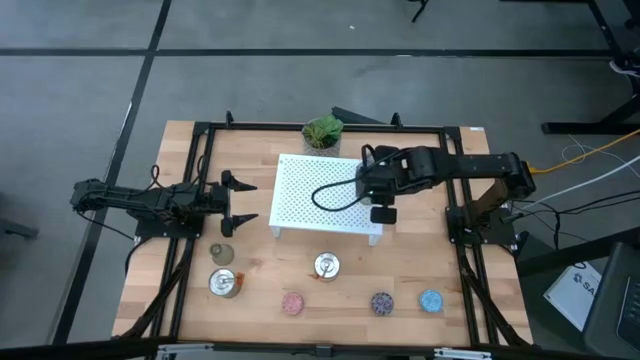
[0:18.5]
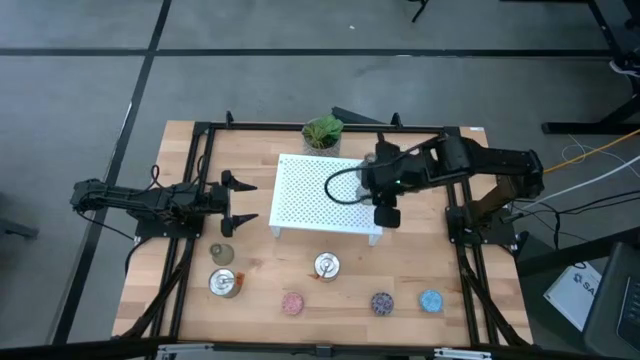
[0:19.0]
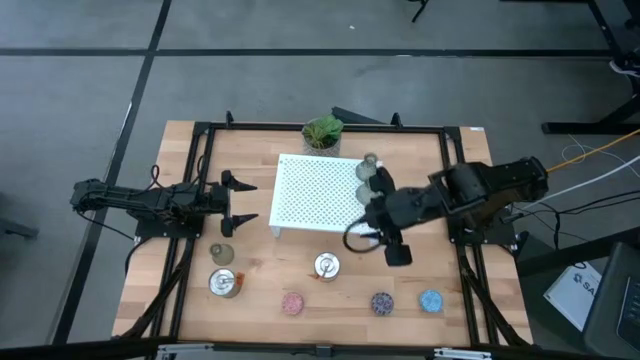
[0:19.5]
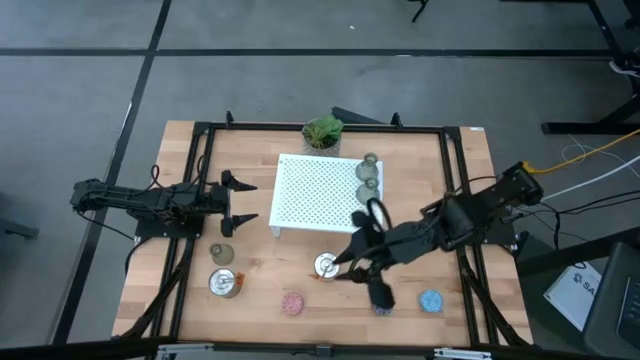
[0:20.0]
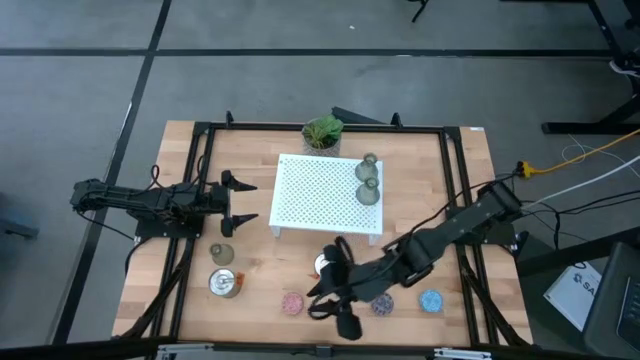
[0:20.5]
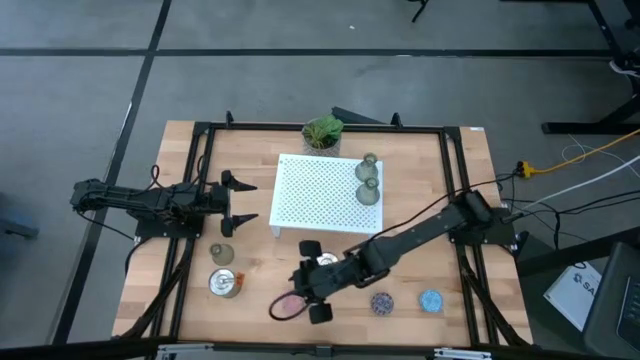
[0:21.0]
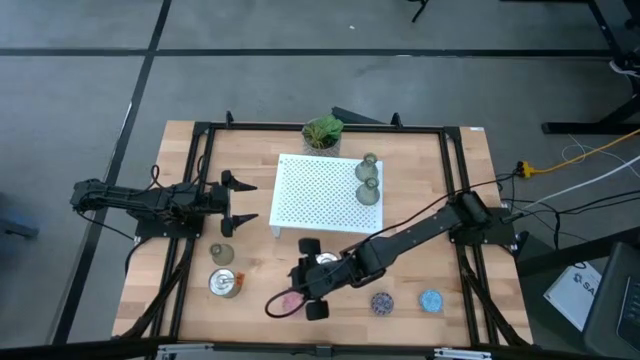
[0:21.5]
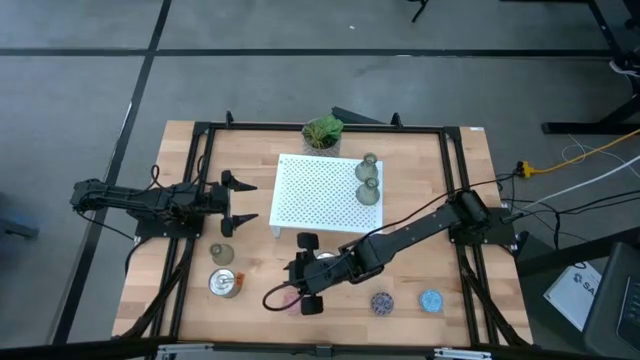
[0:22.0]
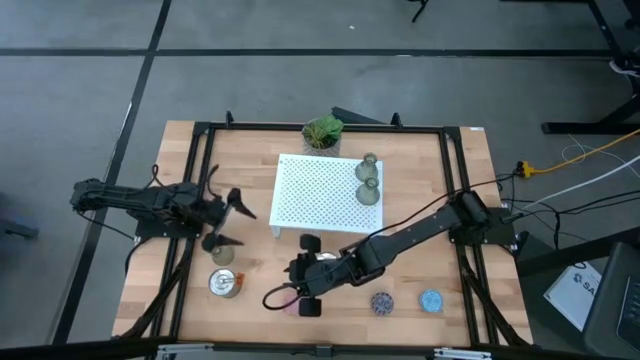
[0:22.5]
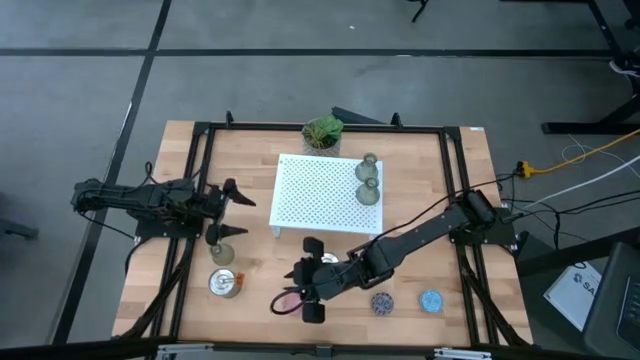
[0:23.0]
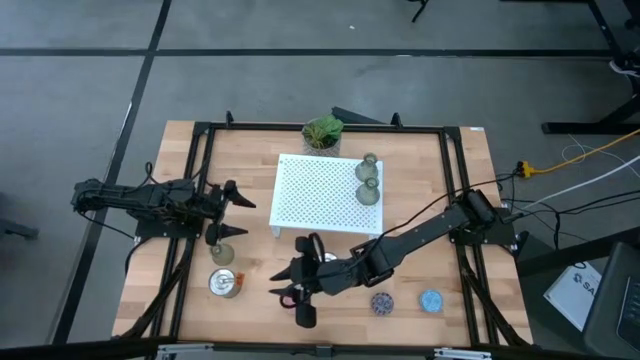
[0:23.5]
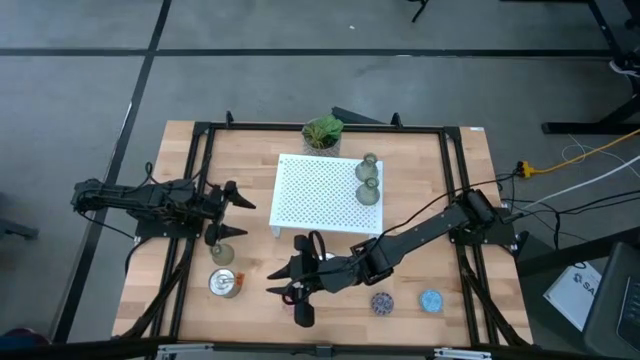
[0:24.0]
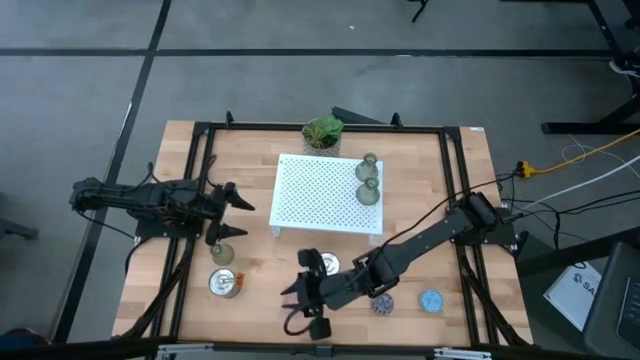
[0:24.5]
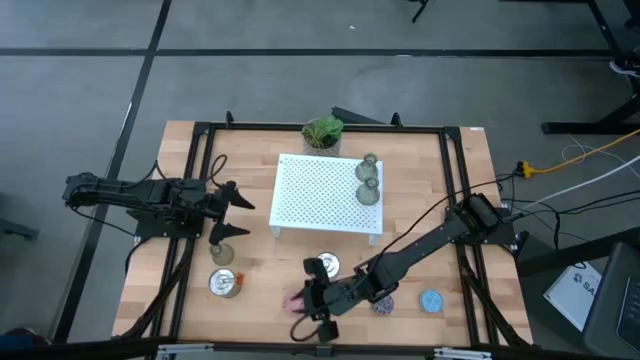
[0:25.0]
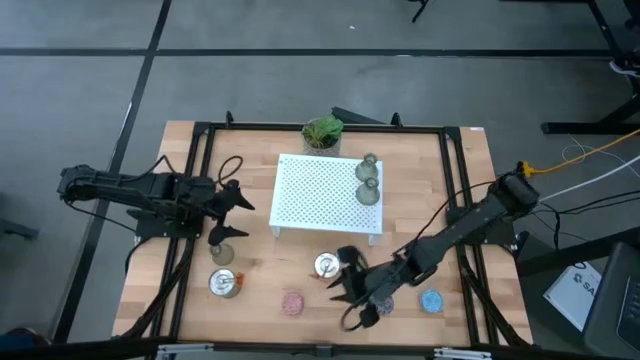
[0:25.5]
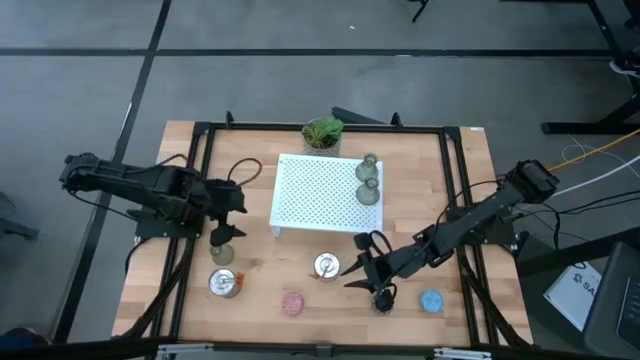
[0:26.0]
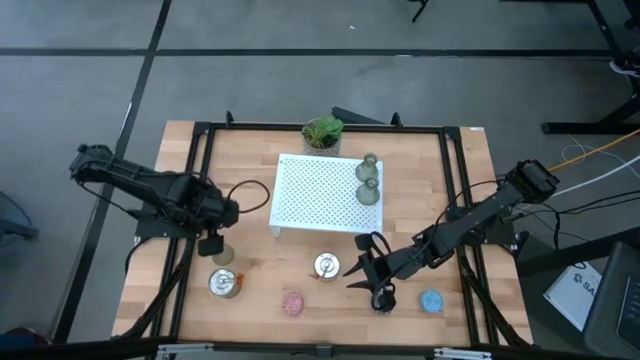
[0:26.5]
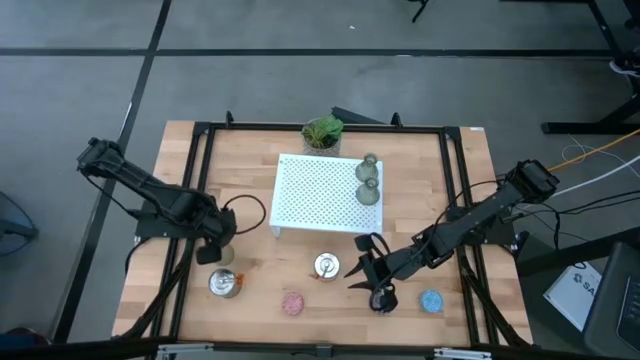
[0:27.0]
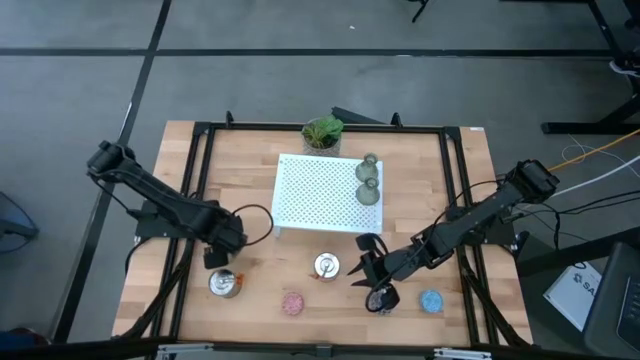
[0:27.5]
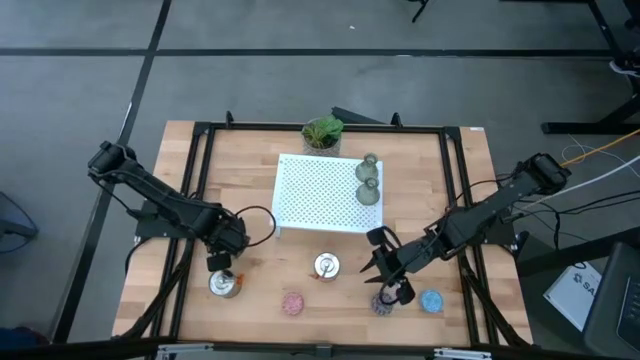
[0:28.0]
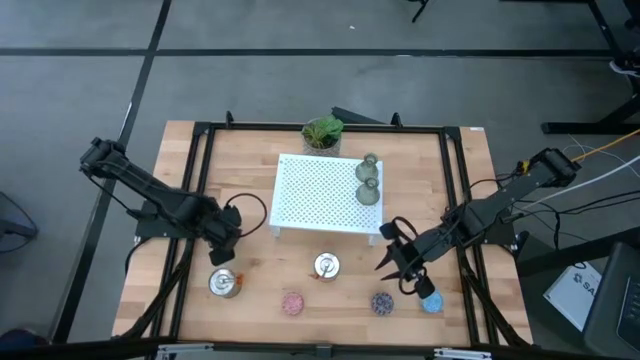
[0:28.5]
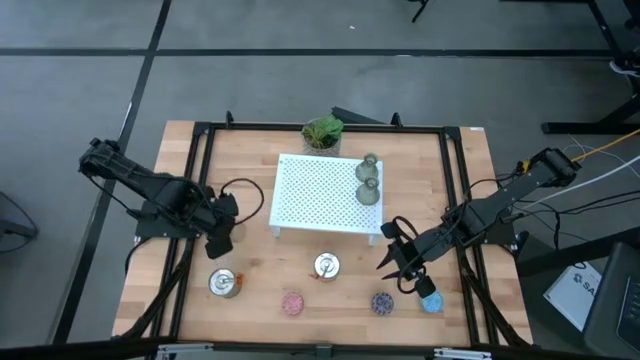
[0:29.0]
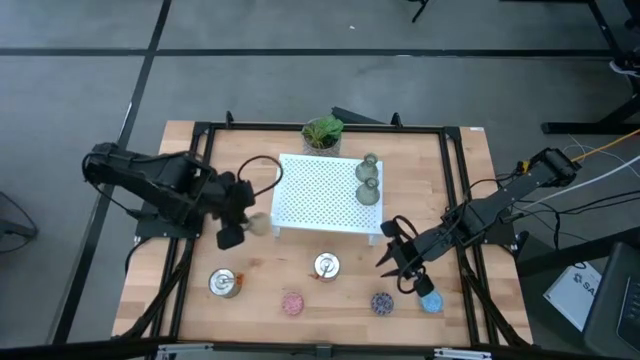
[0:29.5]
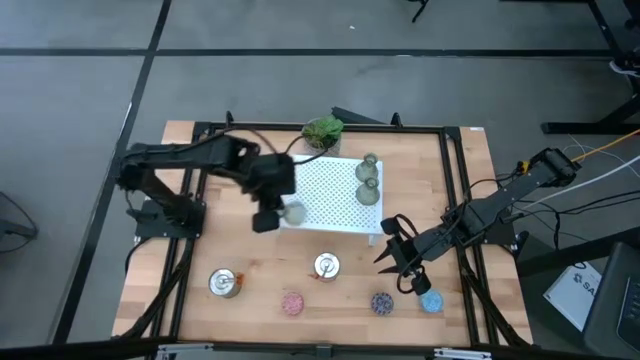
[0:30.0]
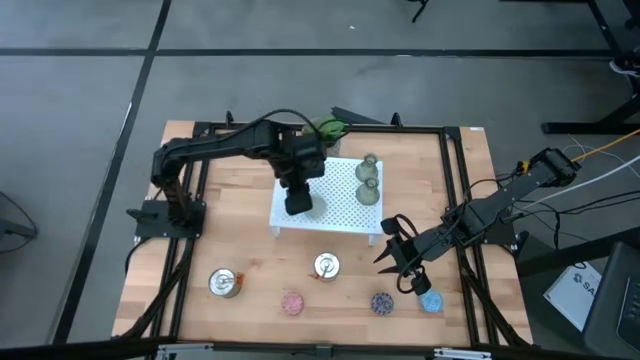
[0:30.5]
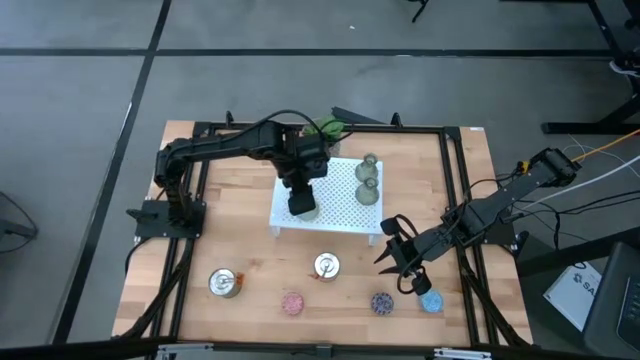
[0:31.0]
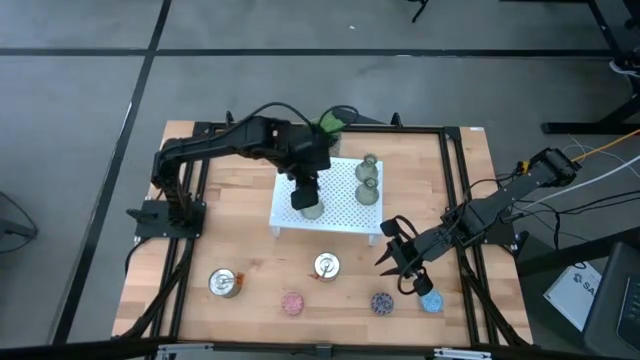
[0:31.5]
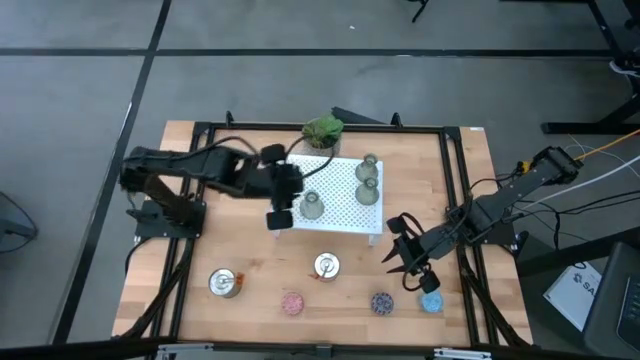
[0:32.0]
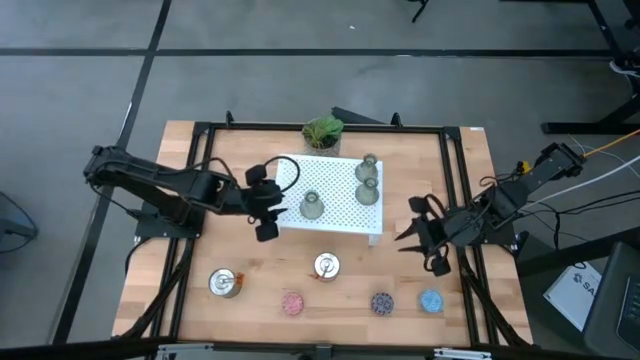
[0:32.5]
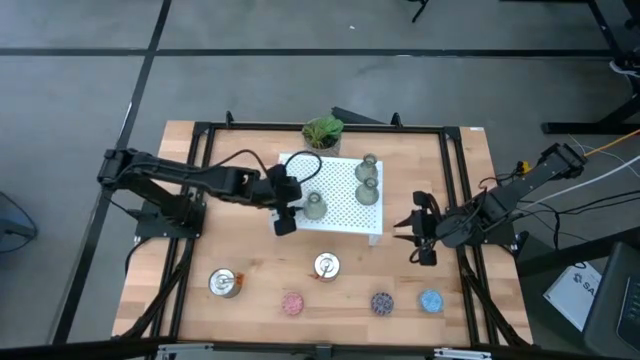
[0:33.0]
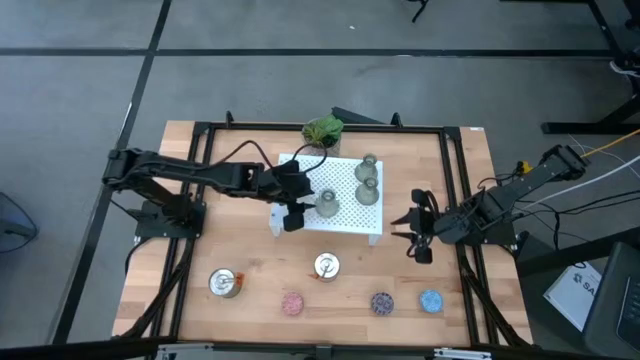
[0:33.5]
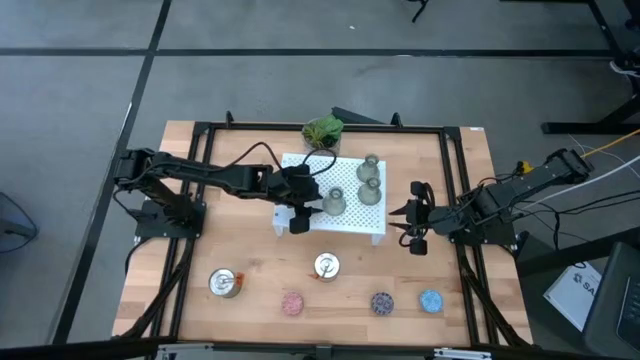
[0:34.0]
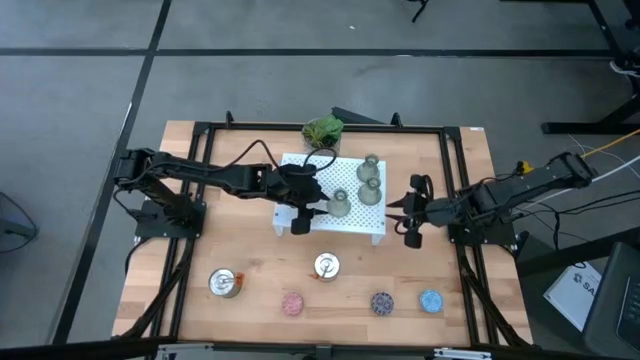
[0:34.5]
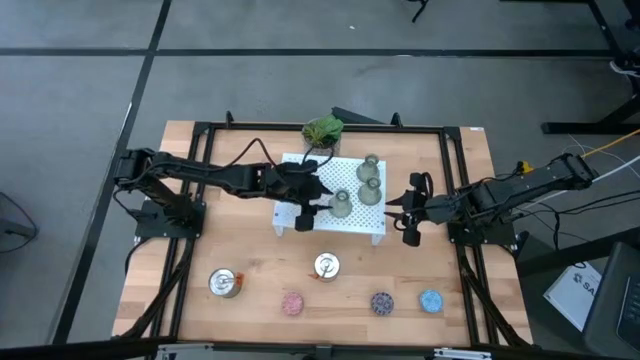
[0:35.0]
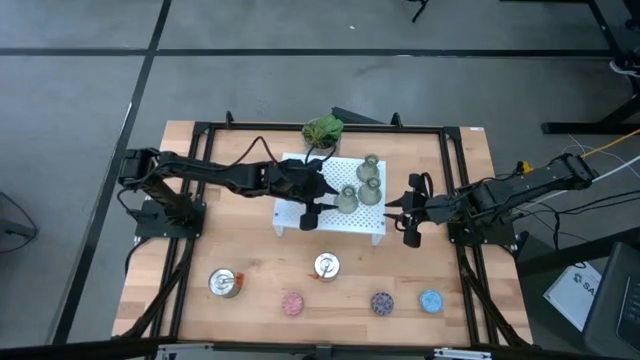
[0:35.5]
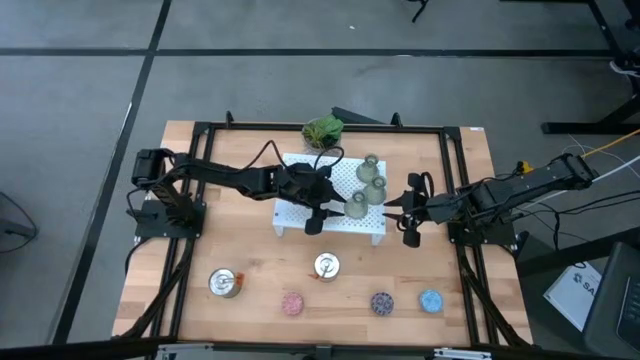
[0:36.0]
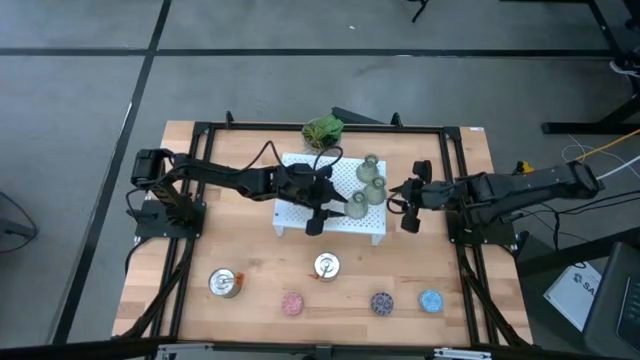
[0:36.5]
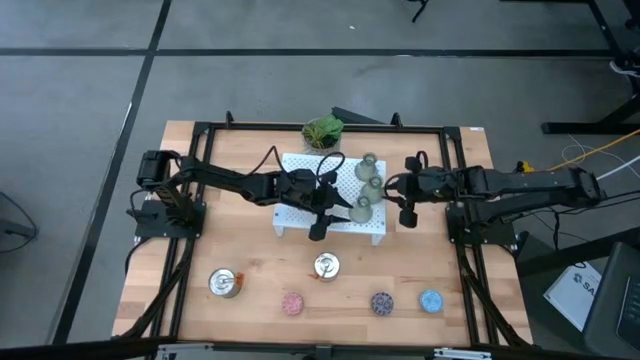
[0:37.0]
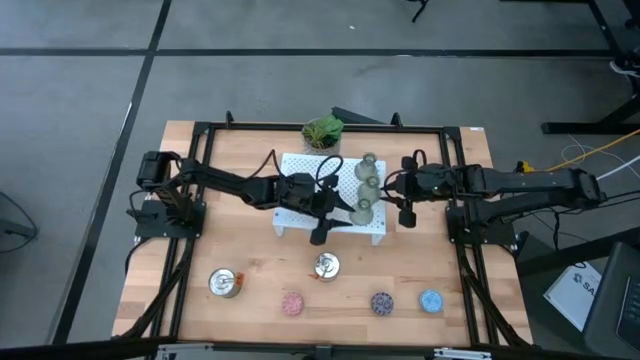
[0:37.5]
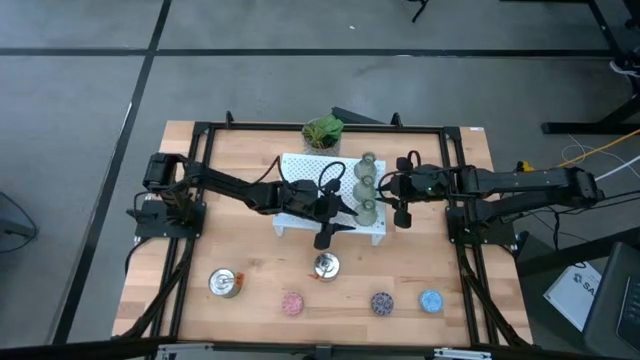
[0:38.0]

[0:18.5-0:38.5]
Task: Stock candles and vases on shelf
Align the transparent vase with the other transparent vase on the shelf
